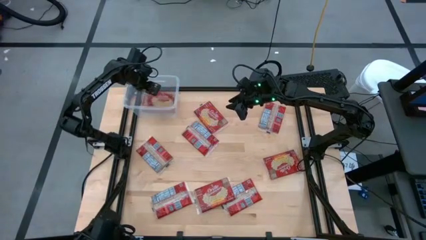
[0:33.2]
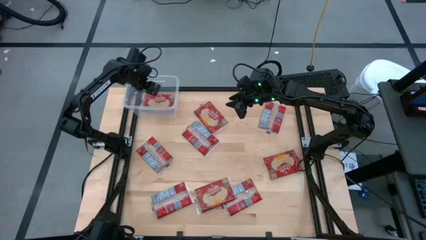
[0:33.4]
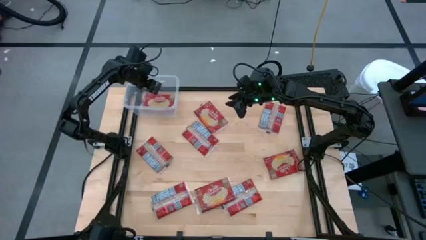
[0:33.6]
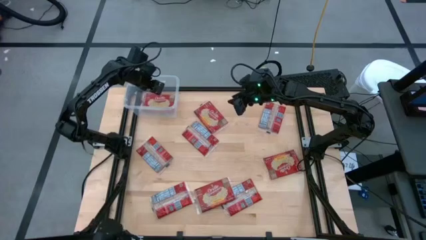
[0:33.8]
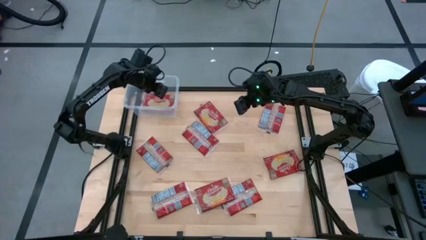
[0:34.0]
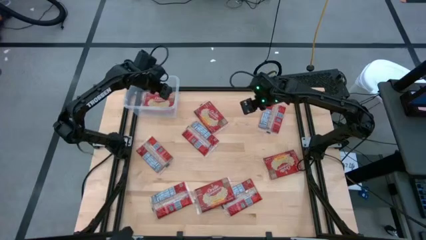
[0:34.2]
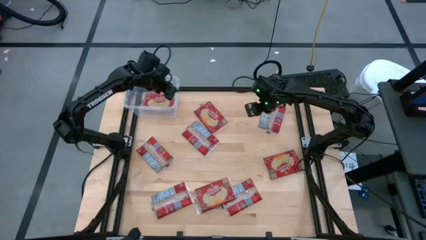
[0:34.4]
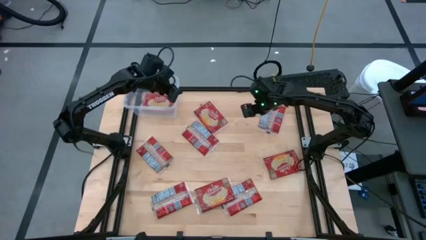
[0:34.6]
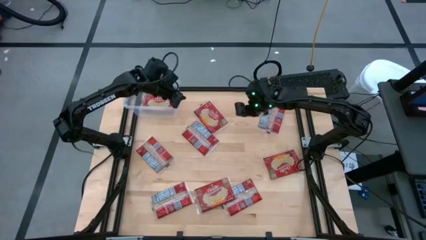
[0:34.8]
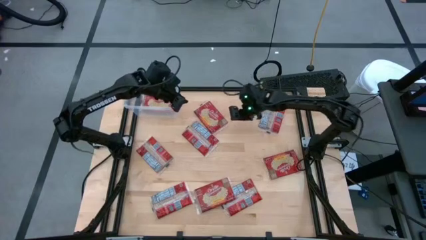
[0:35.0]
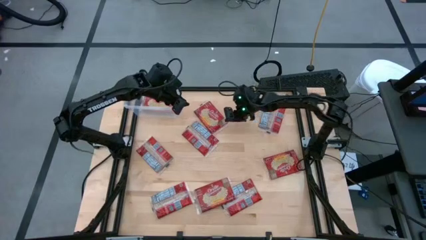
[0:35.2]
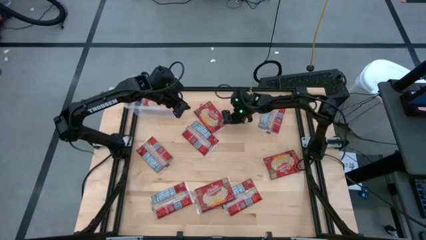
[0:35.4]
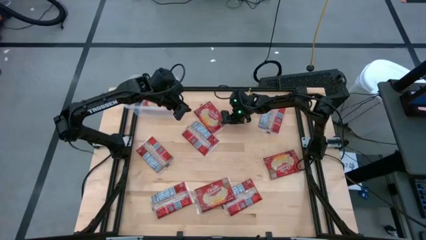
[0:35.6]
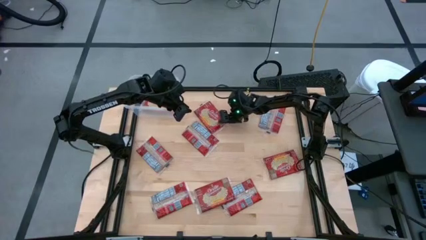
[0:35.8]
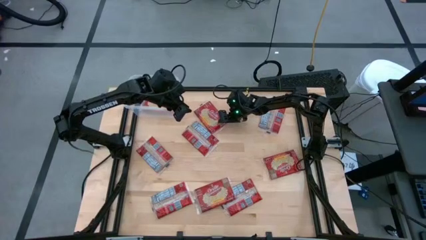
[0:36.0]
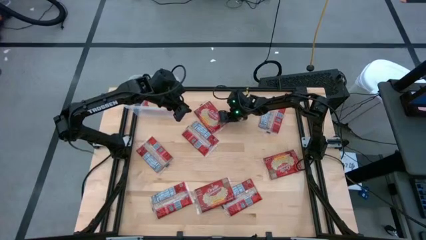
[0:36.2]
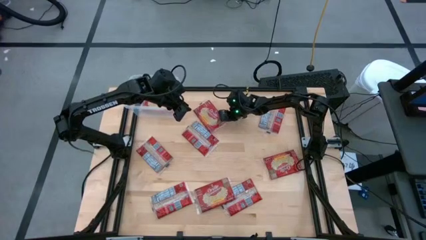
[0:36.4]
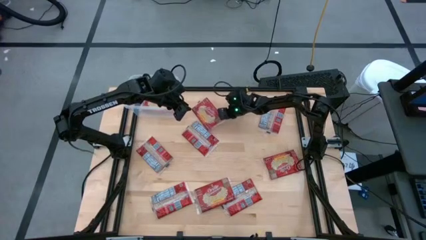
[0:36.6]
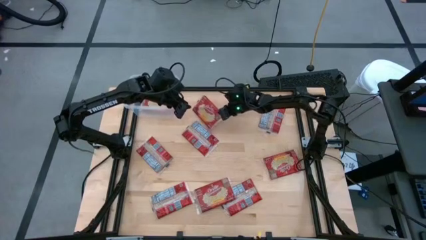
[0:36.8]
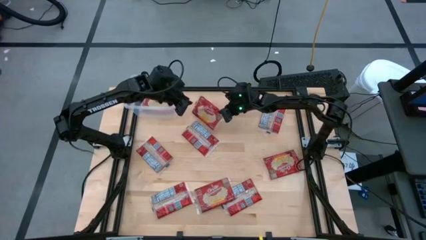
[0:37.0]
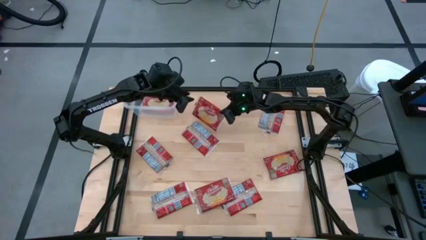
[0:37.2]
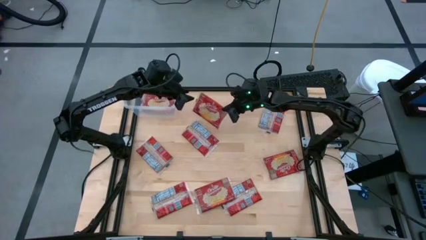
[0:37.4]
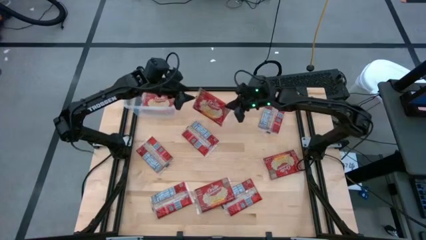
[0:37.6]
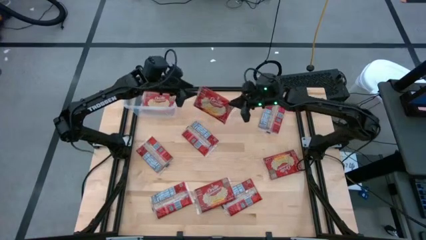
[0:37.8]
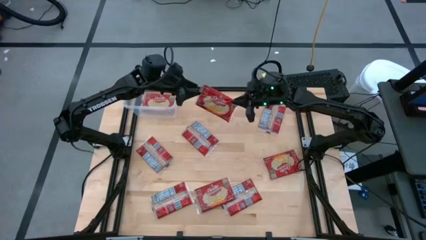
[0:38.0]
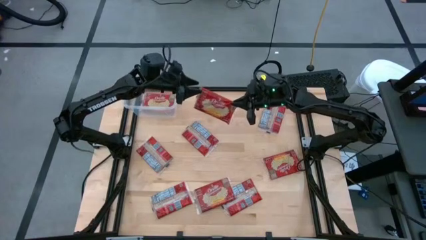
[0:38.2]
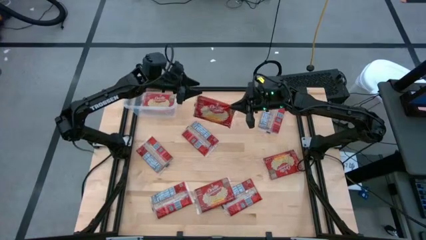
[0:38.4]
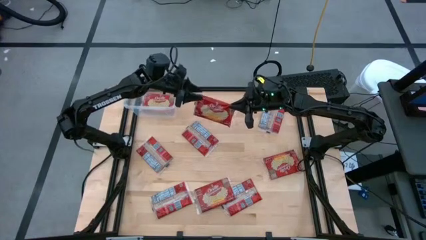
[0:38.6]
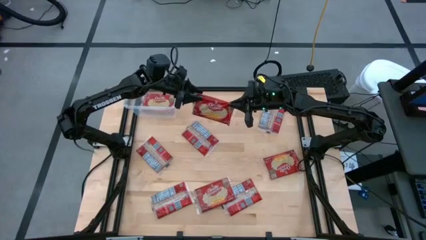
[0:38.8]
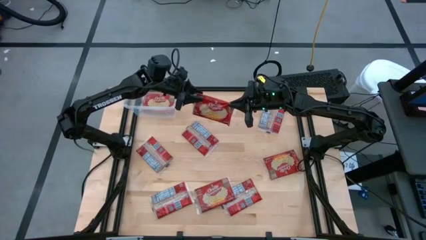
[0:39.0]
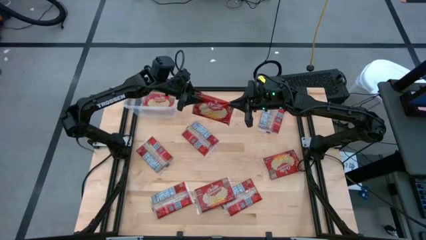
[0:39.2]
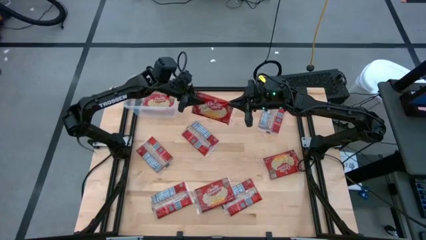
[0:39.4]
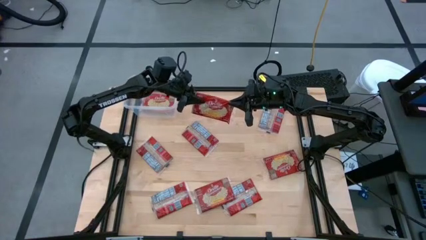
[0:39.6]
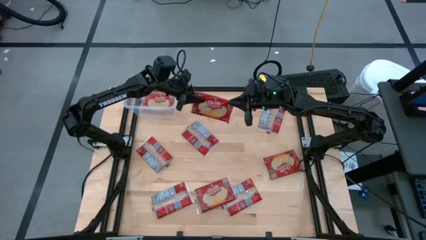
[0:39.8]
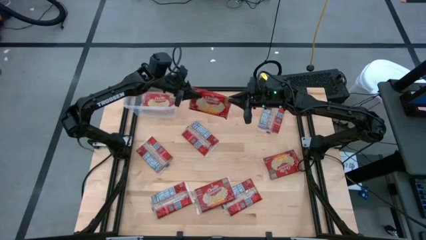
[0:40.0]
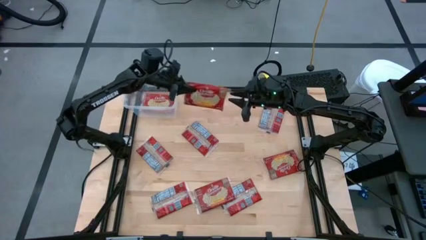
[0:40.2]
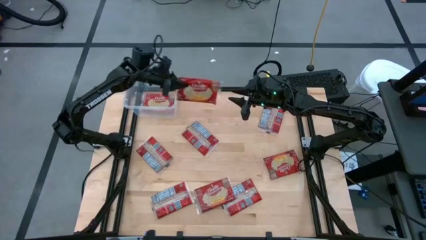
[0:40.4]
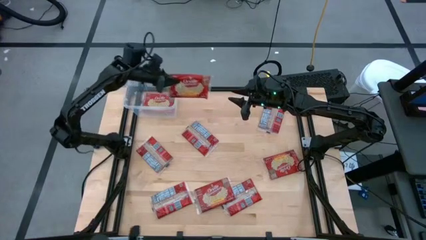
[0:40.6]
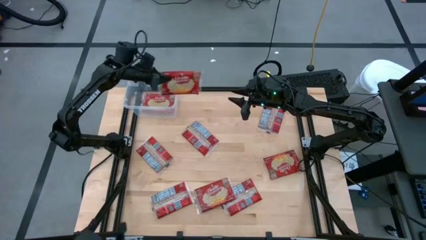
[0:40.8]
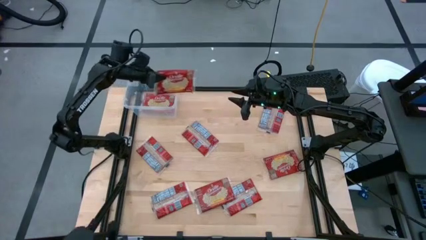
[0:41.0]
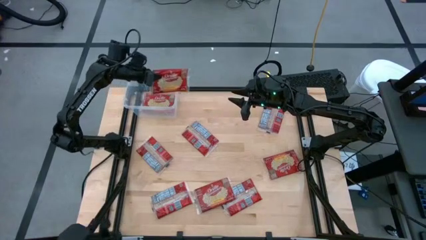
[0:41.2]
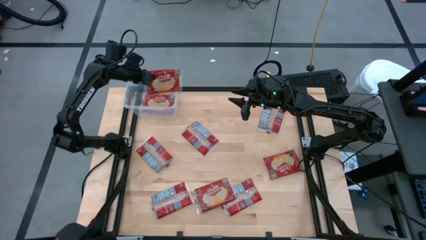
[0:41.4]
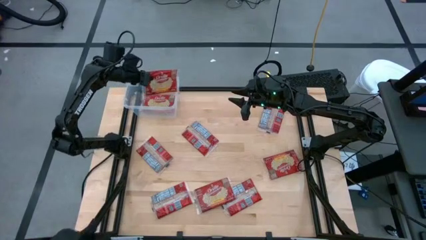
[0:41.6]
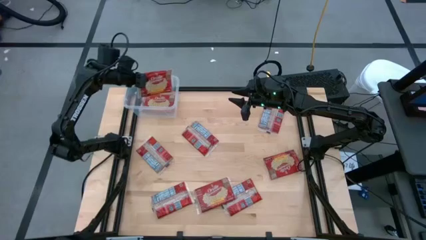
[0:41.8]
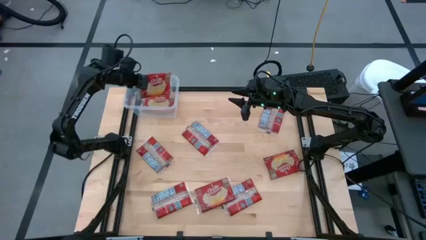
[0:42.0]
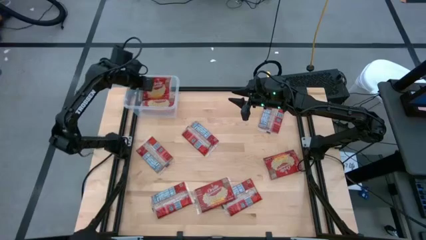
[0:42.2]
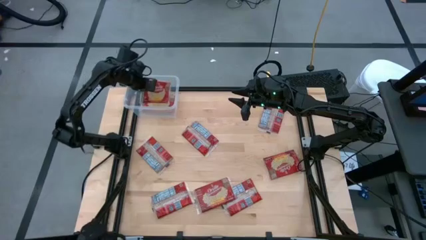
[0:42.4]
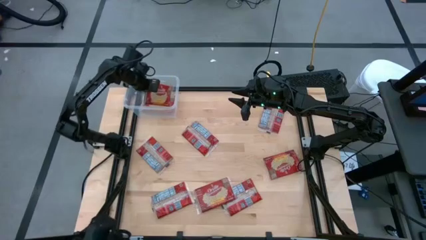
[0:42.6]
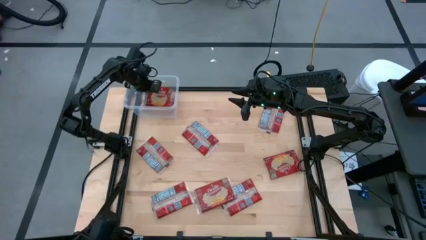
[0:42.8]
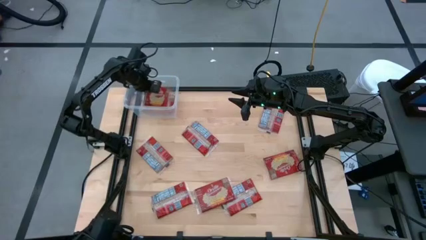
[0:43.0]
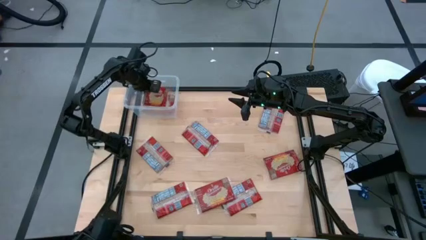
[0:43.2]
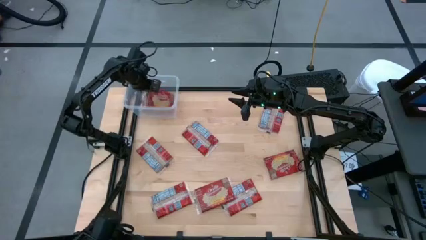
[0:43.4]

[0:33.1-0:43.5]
Task: Sort popcorn bags into baskets
Put the popcorn pack into the transparent bin
